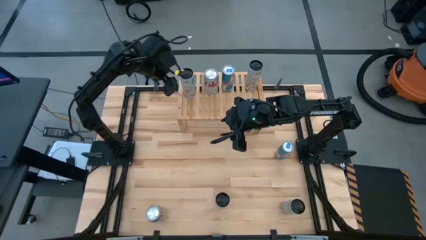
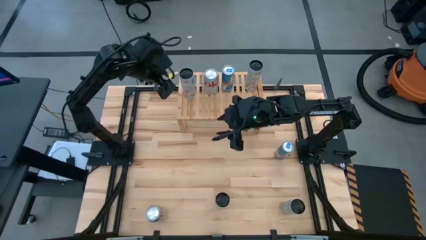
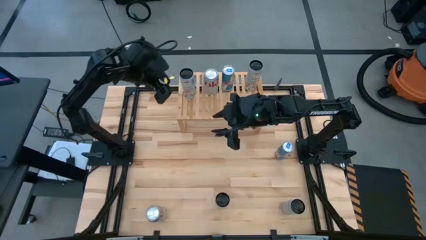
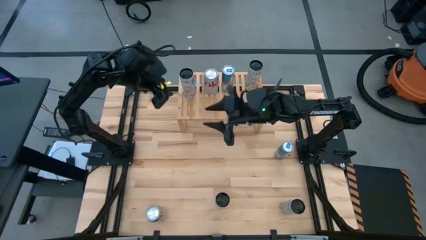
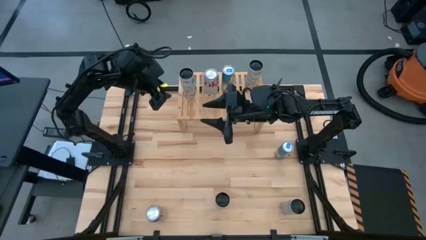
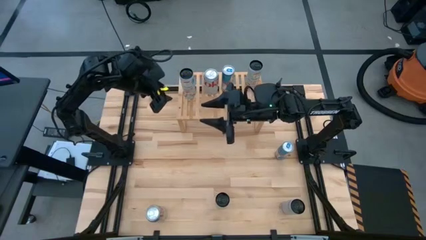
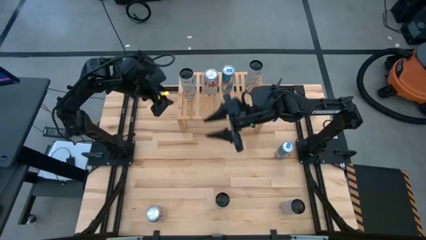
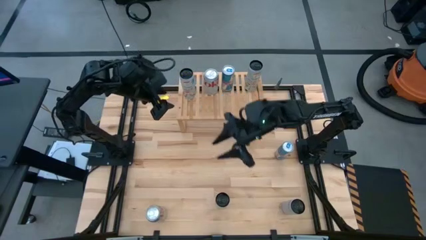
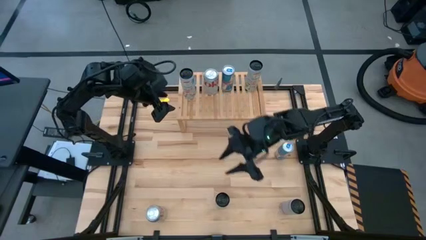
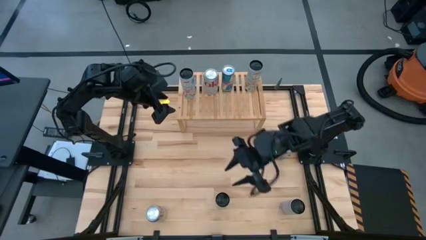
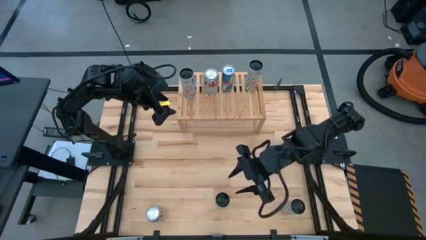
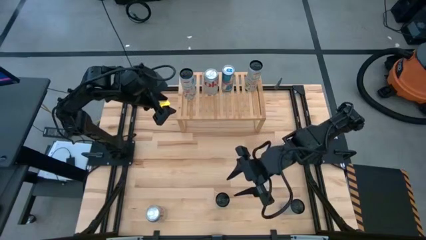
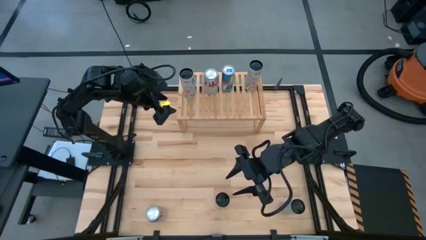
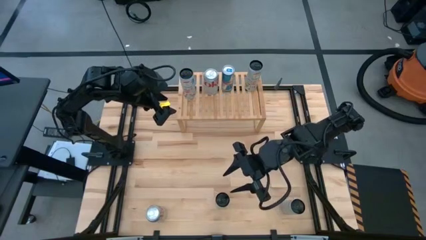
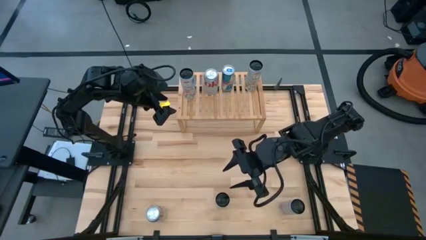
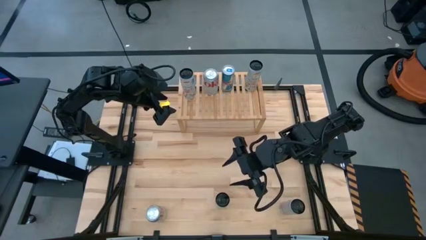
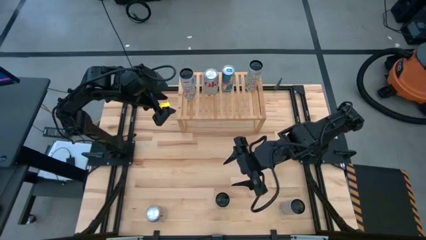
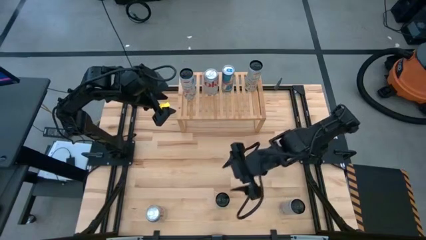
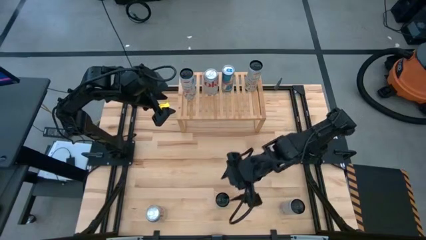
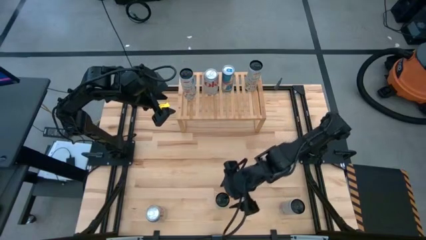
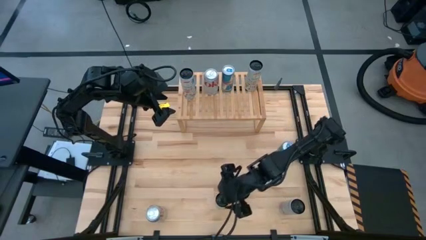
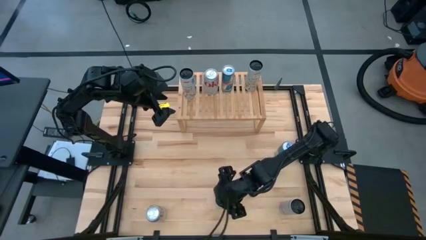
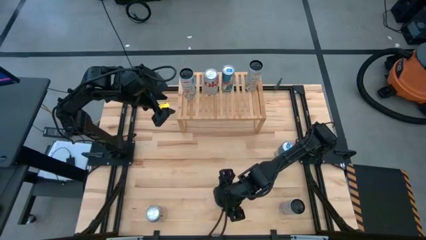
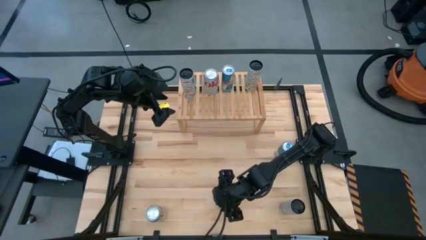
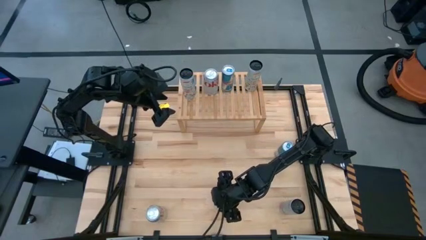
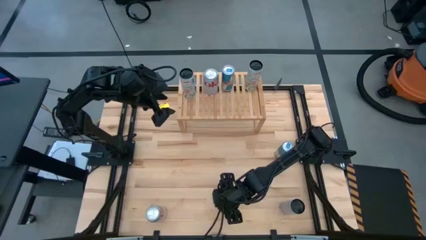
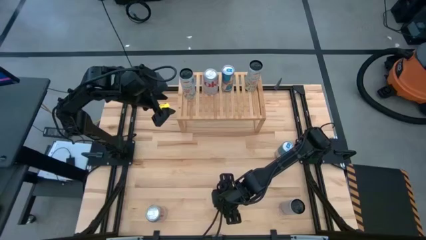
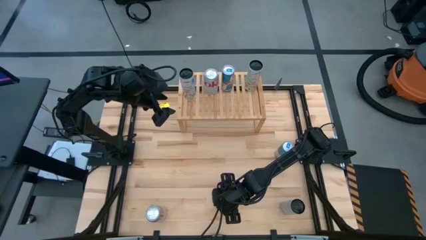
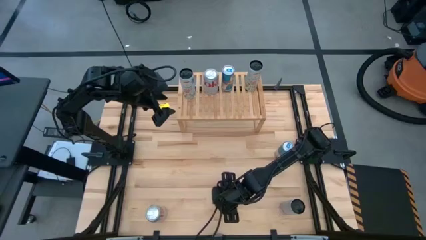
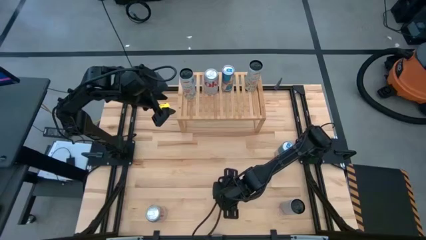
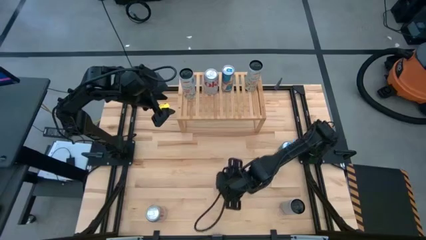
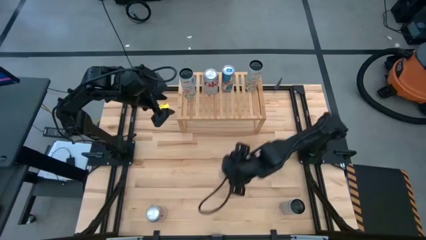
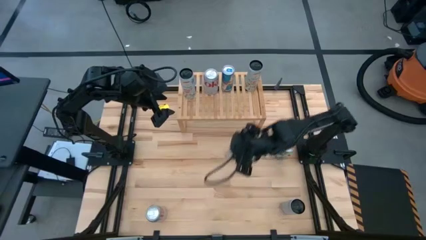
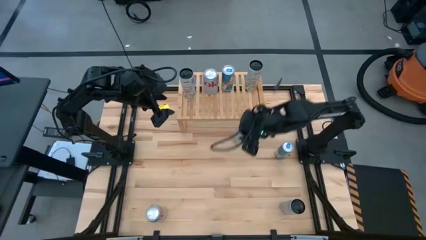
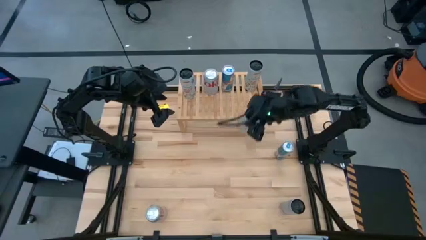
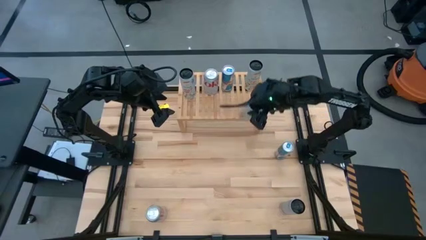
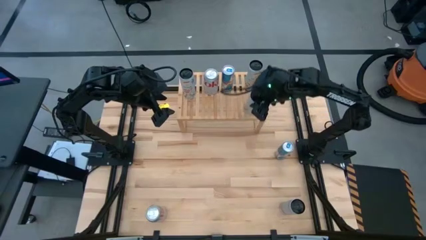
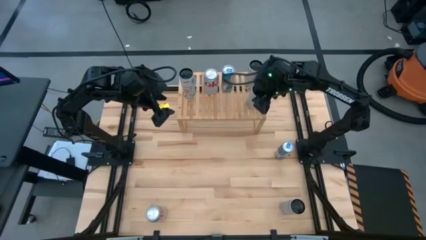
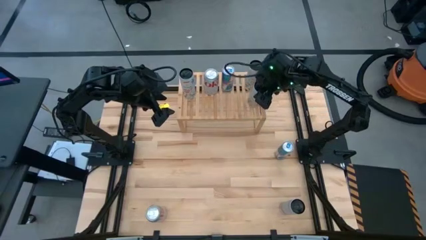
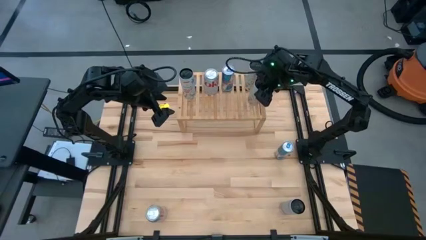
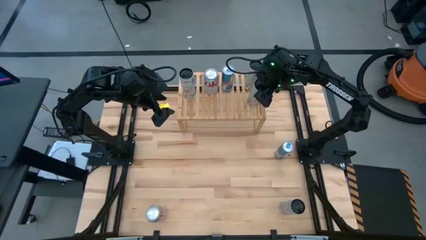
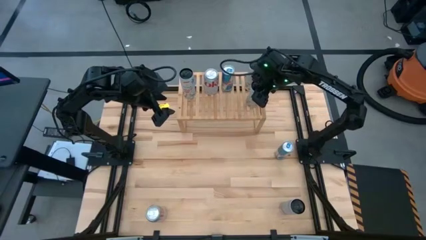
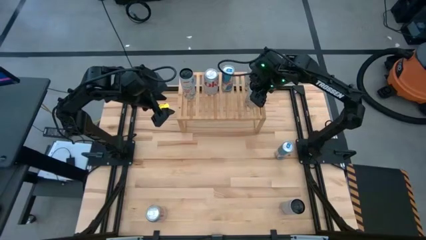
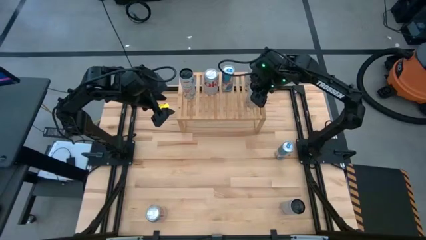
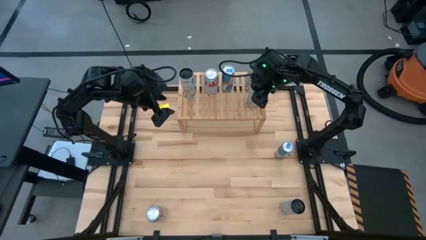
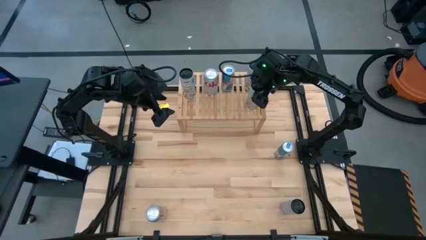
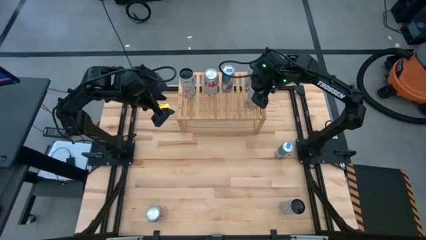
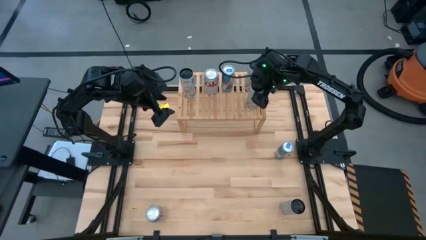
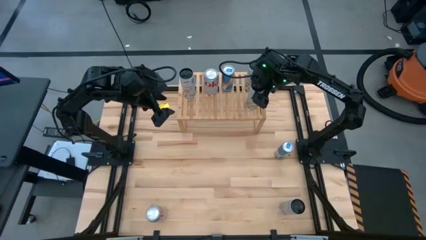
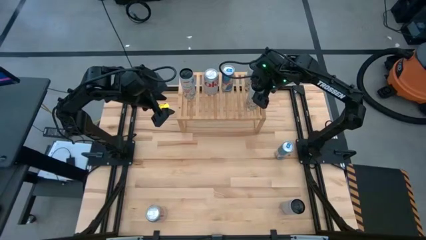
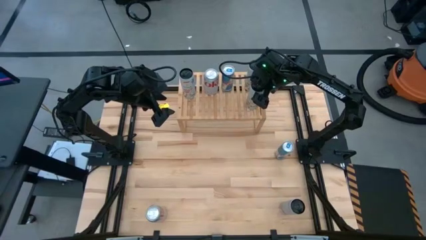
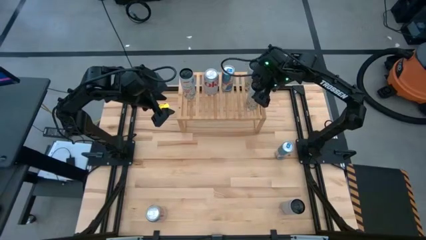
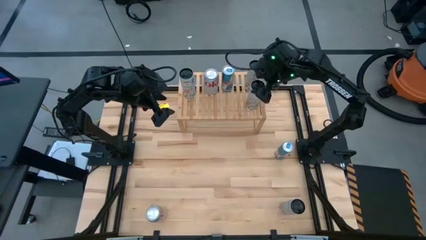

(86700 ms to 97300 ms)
Task: Place canned beverage on shelf
Put the white yellow soda can on the shelf aligned with the other yellow soda can
